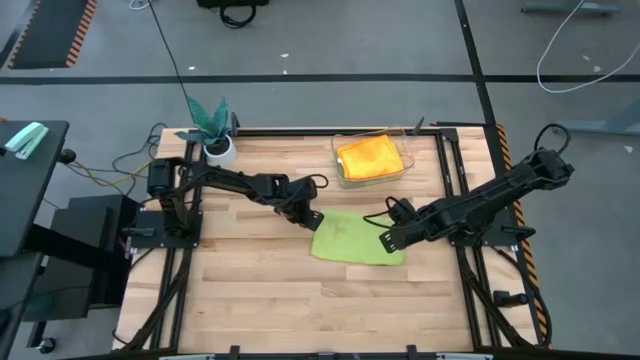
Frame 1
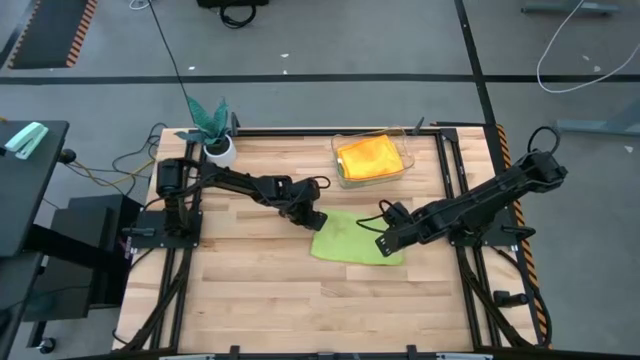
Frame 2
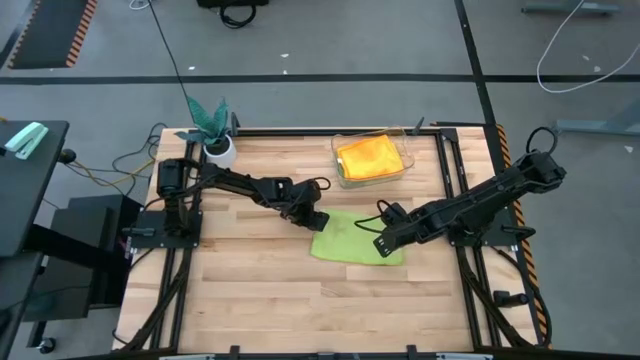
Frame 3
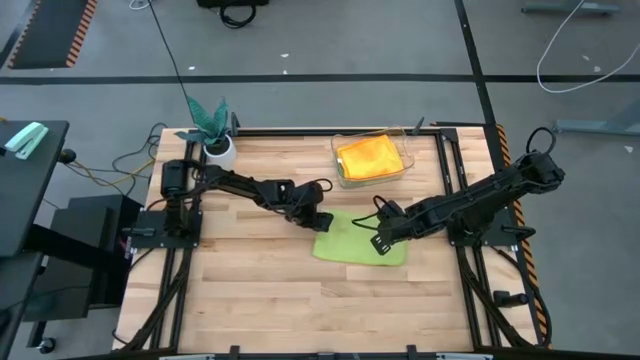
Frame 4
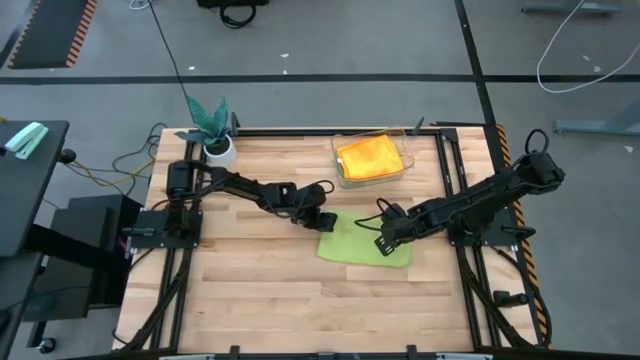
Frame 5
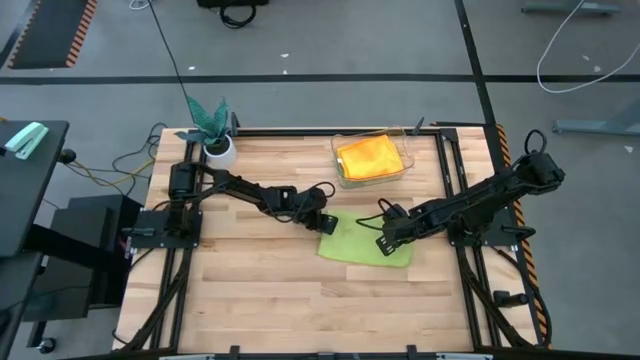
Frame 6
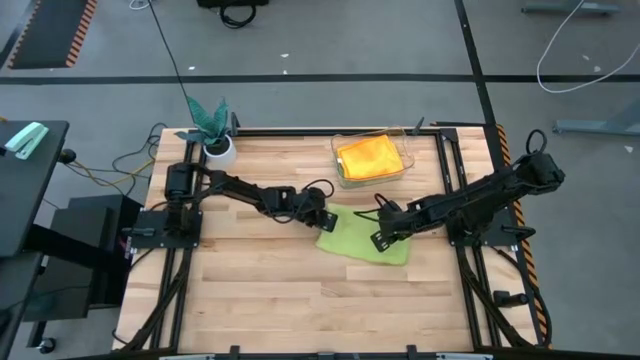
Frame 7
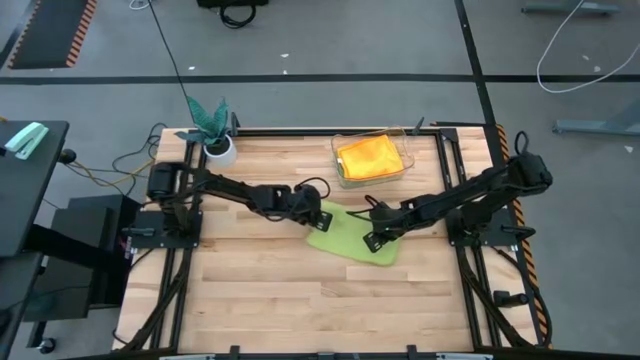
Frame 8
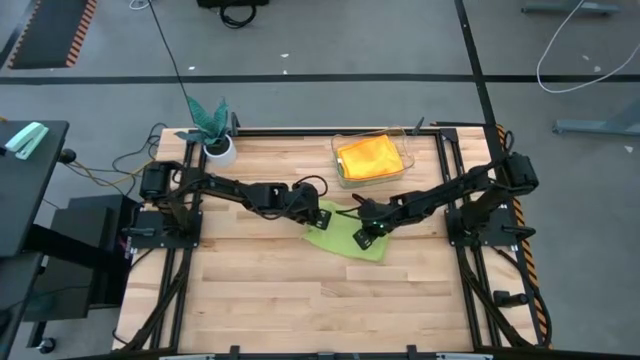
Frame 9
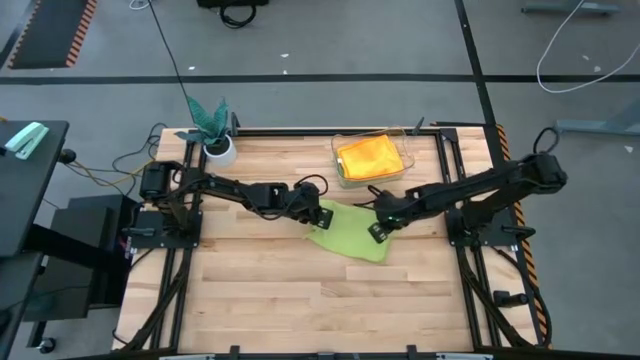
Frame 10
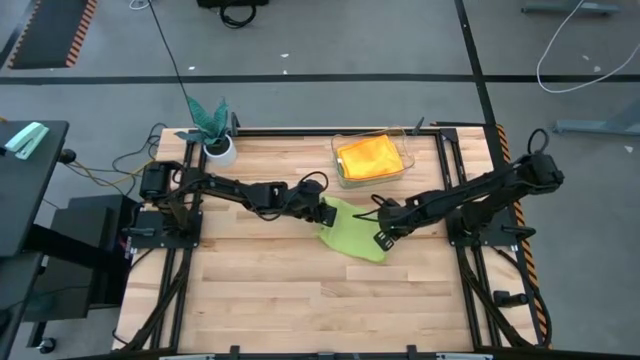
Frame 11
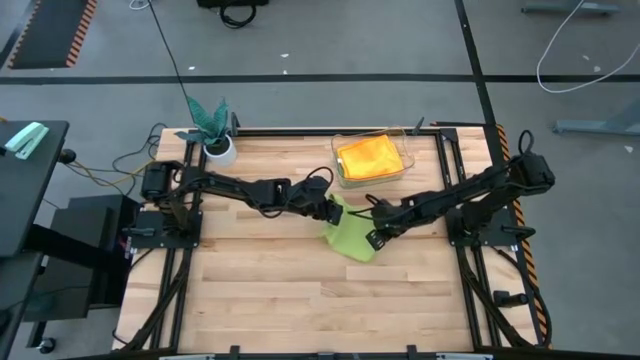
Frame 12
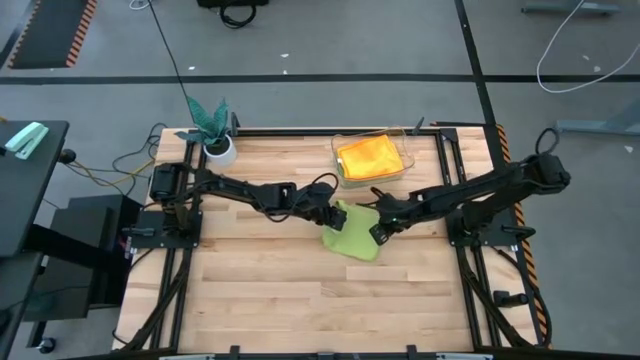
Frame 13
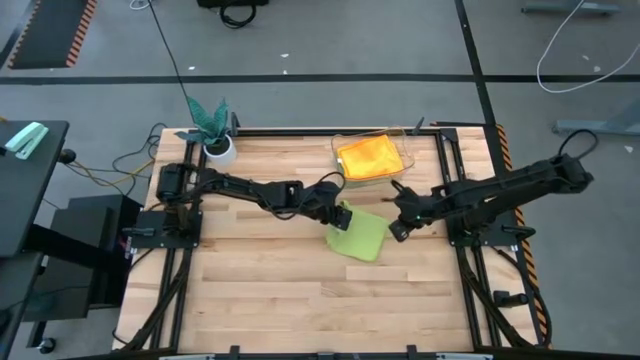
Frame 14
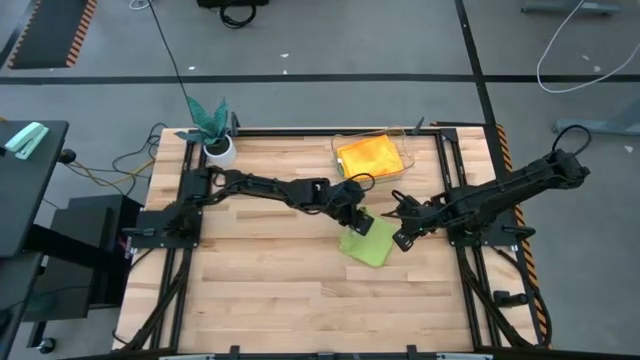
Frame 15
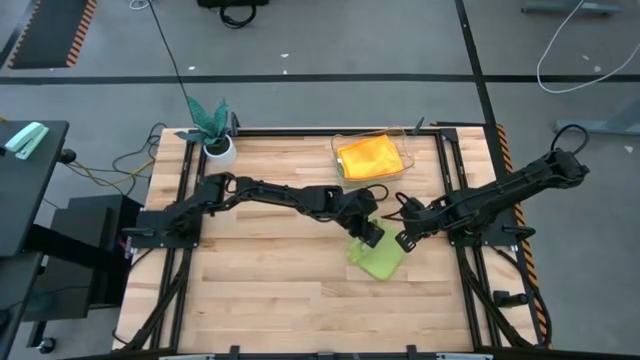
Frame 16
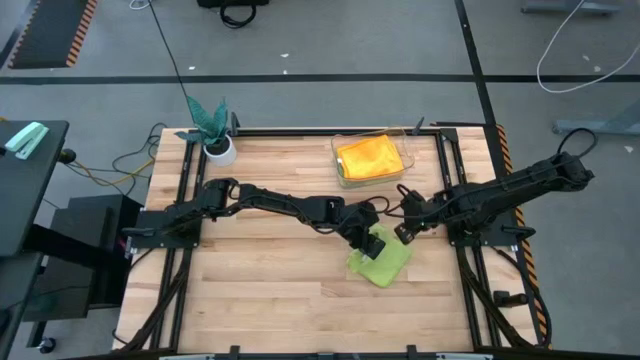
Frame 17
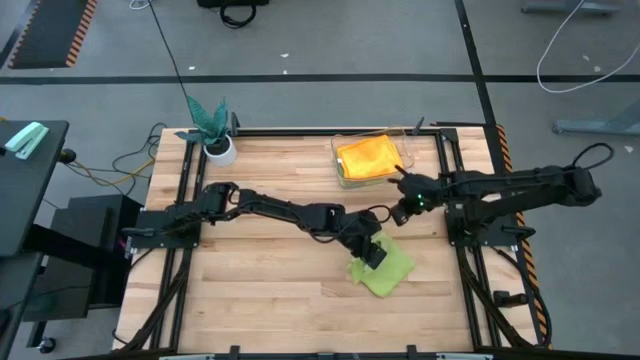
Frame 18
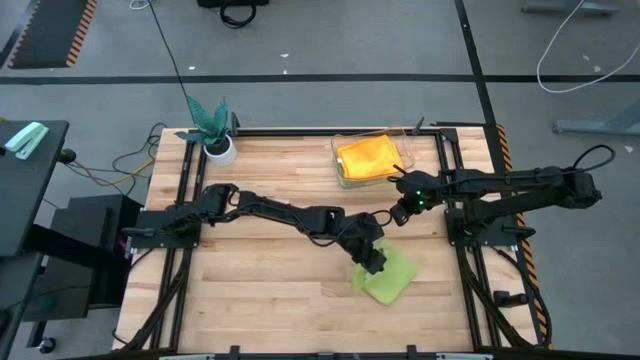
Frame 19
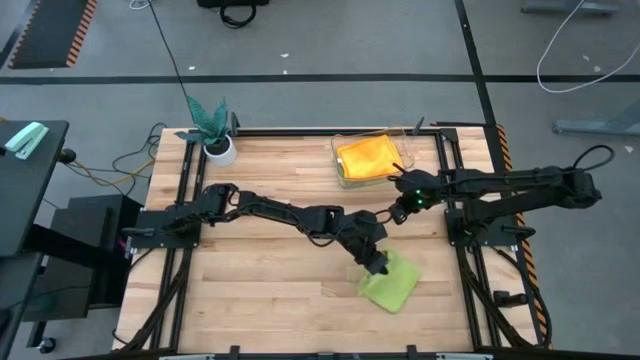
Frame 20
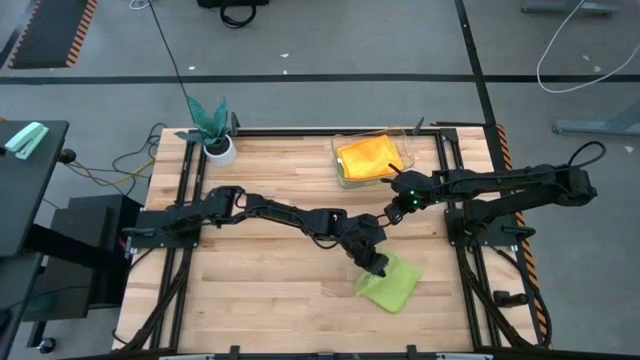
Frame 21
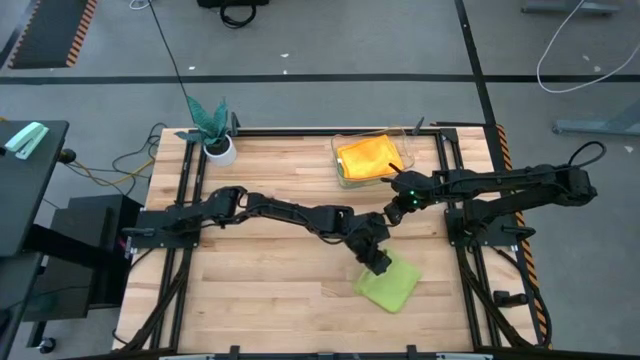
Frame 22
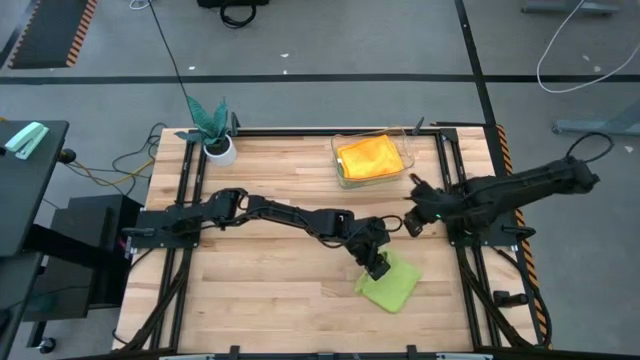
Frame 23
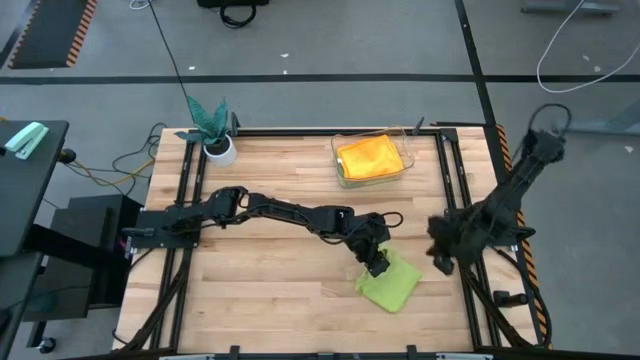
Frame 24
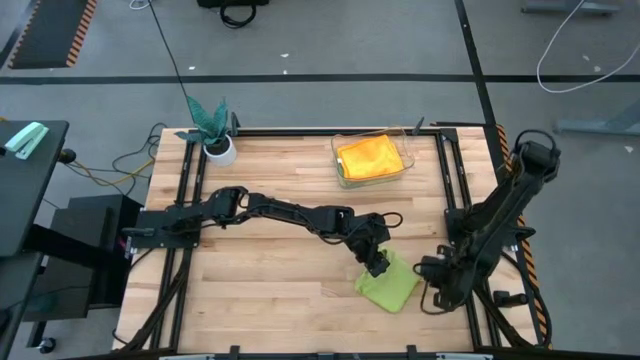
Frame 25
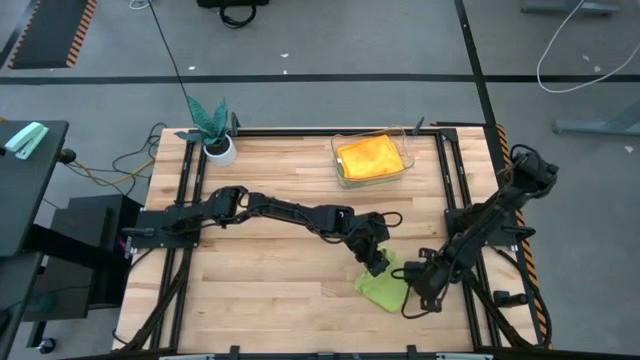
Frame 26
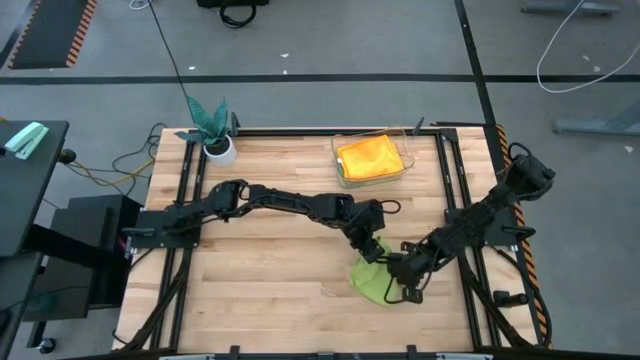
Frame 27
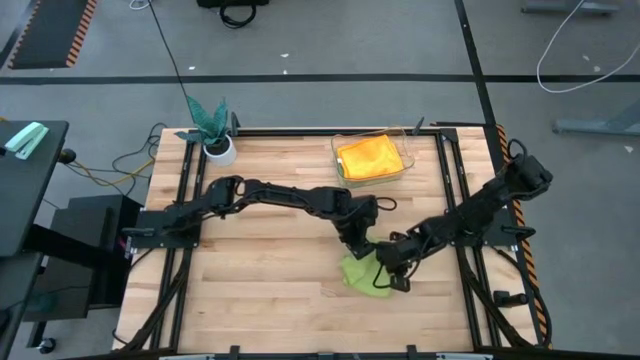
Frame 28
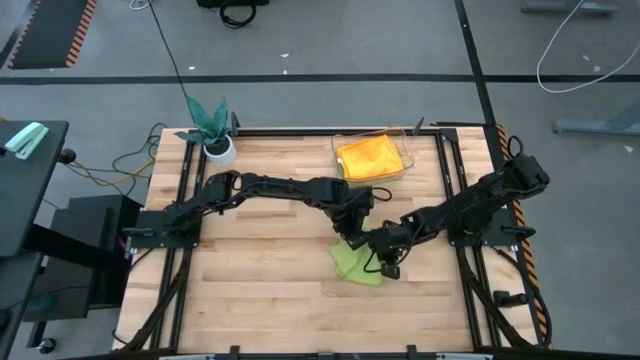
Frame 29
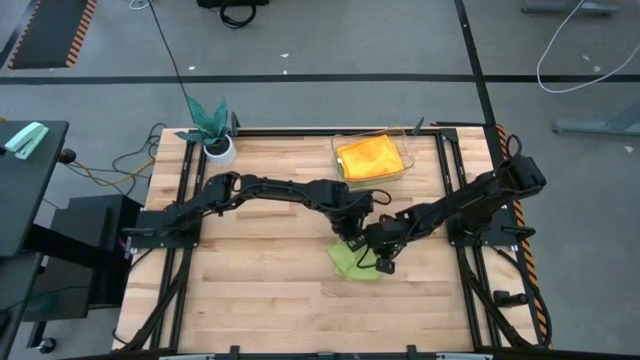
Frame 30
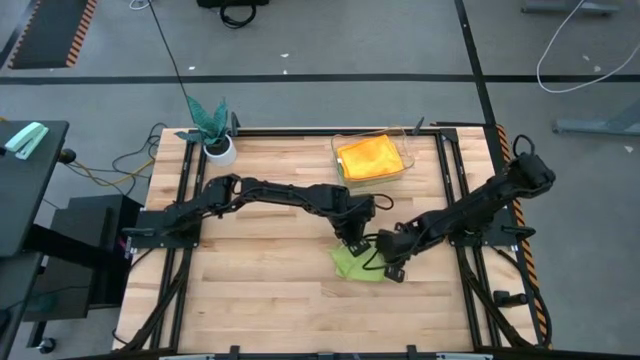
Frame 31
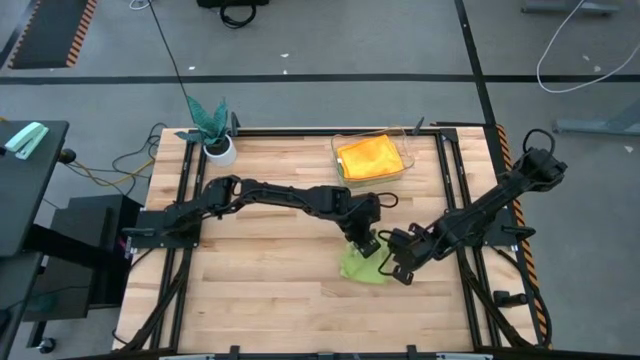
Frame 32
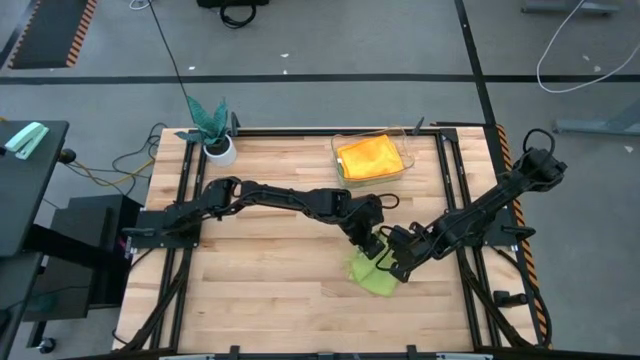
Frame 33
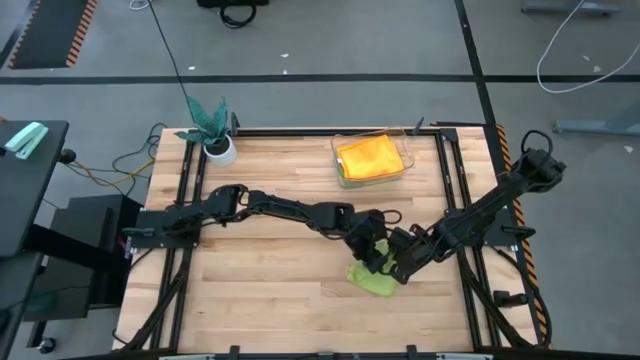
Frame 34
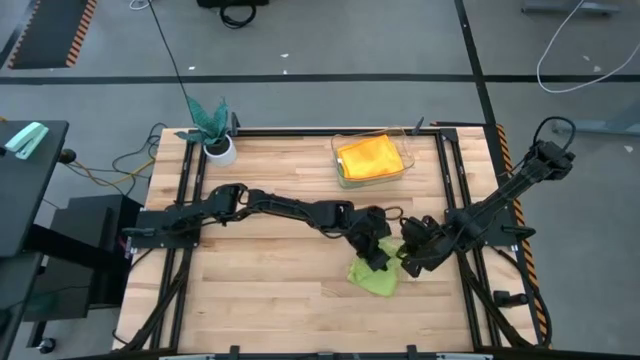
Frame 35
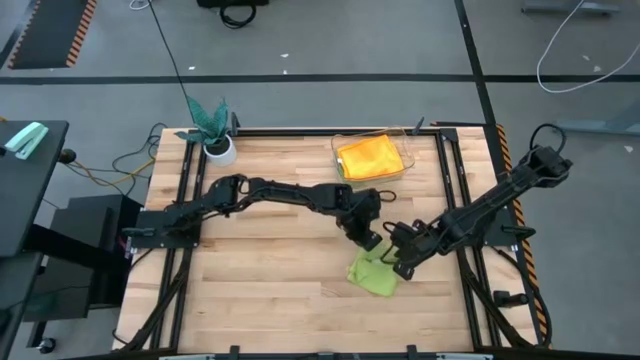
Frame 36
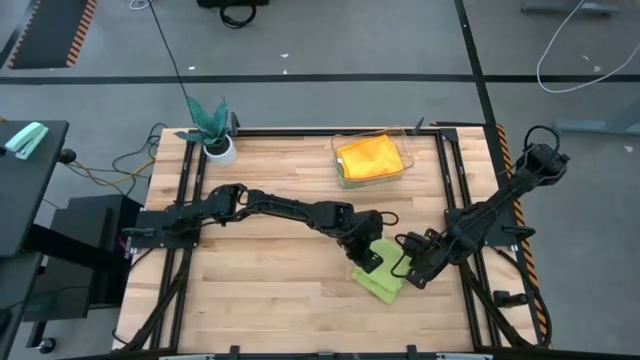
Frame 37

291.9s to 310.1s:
Task: Fold microfiber towels
Fold the light green towel

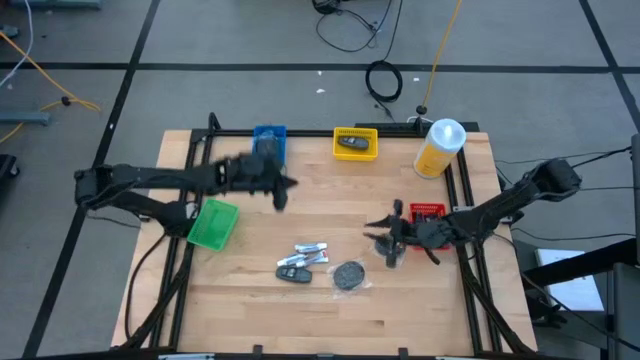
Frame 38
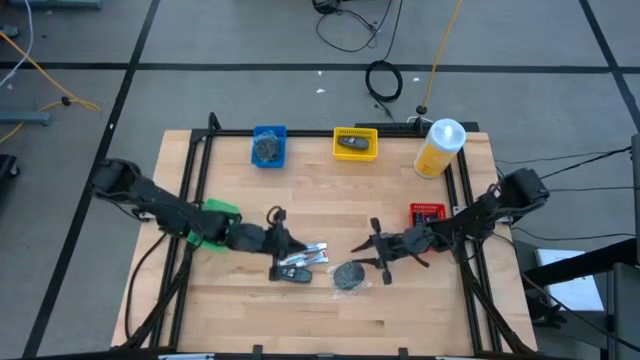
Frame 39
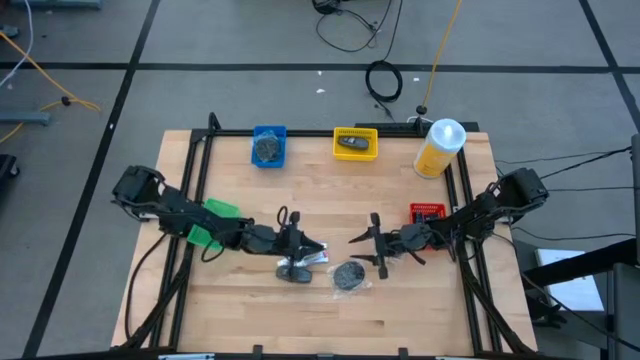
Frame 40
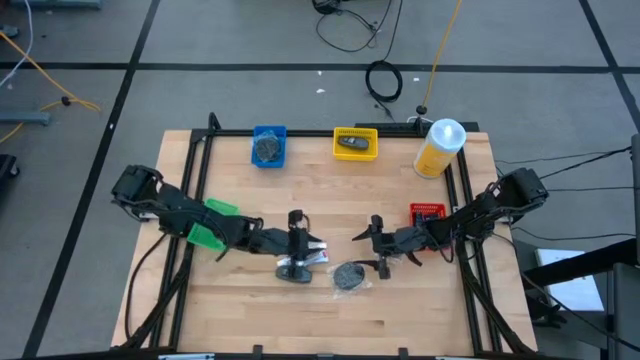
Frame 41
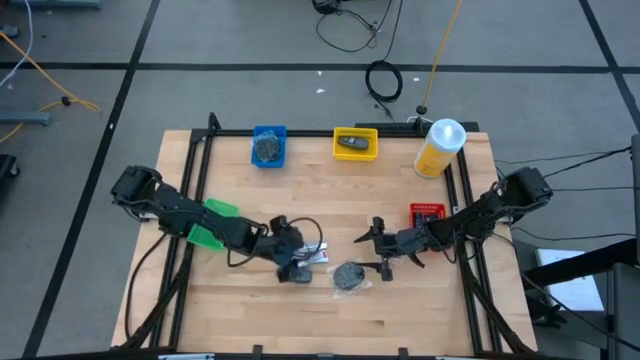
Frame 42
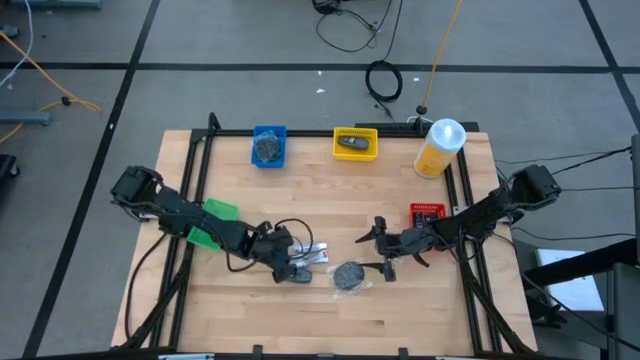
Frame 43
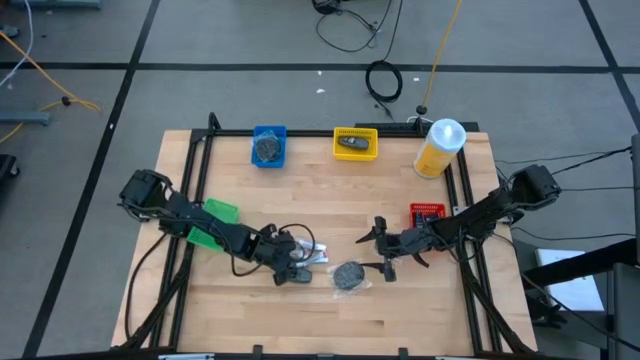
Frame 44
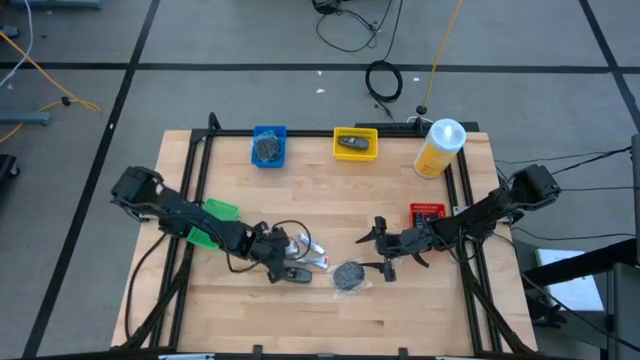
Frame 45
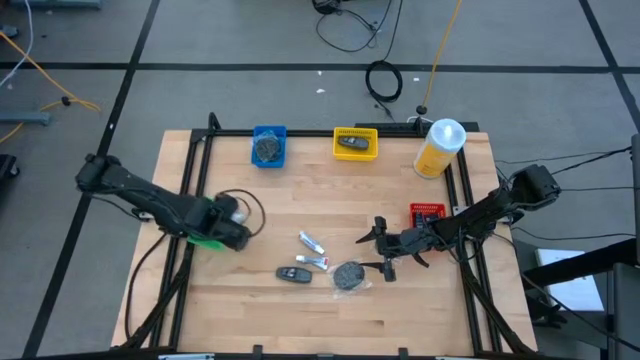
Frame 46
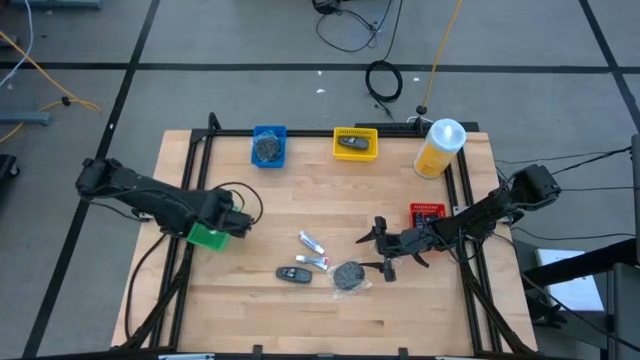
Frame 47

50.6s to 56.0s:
Task: Pick & Place Travel size toiletries
Put the white toothpaste into the green bin
